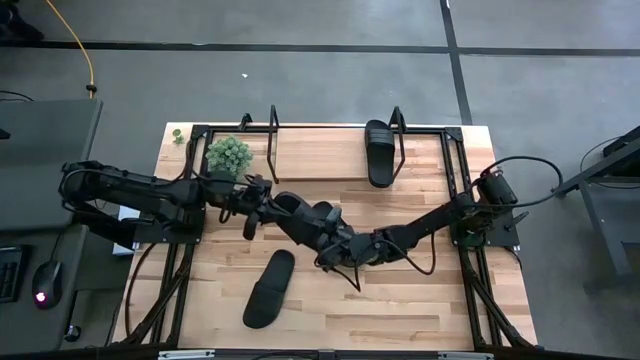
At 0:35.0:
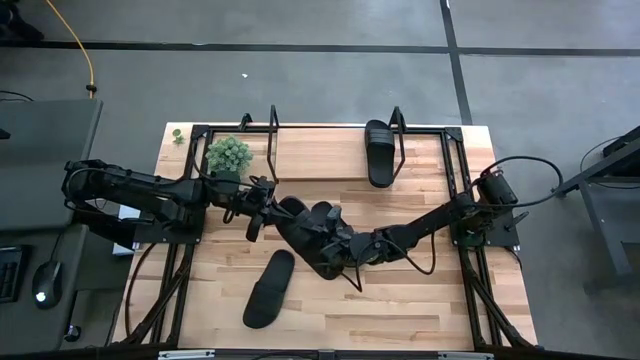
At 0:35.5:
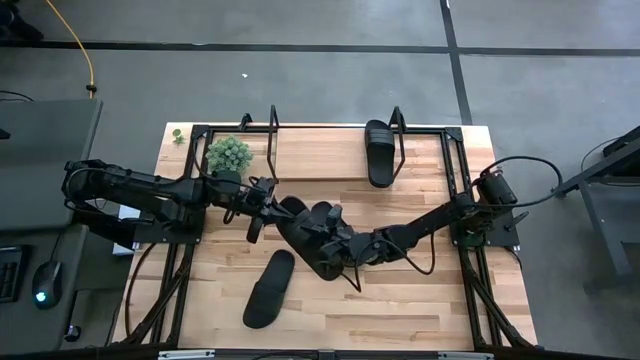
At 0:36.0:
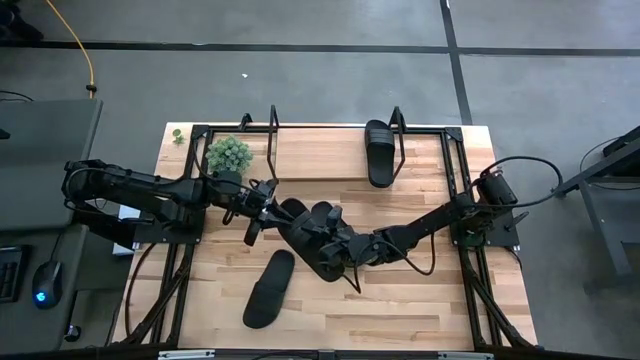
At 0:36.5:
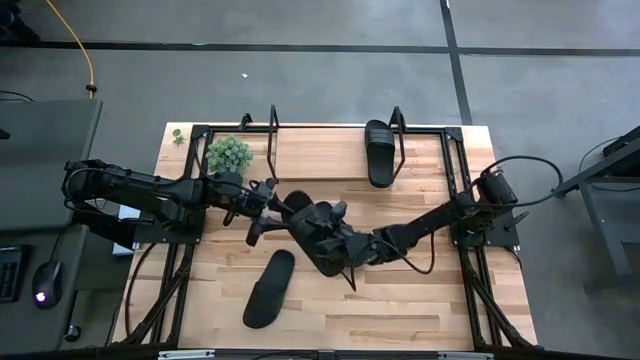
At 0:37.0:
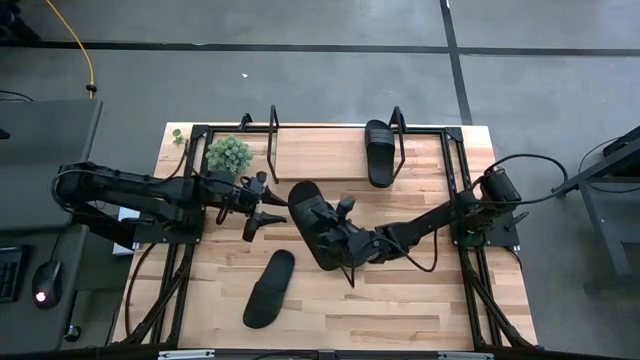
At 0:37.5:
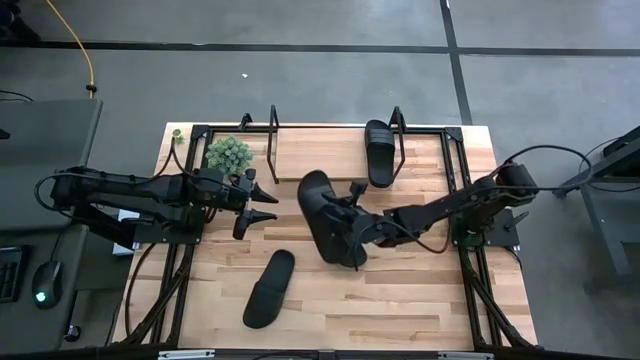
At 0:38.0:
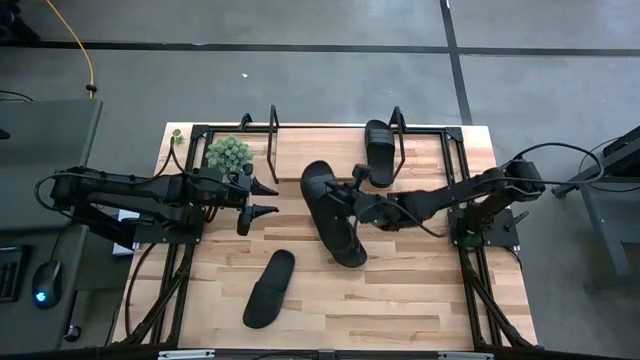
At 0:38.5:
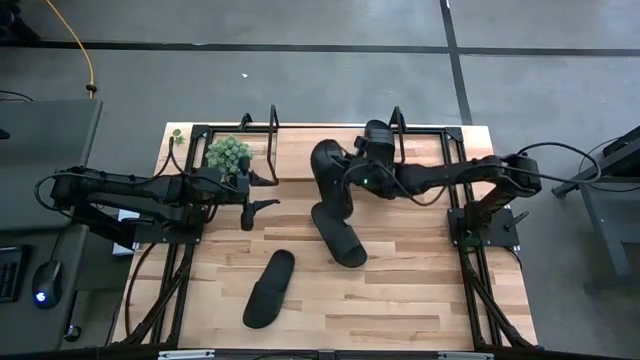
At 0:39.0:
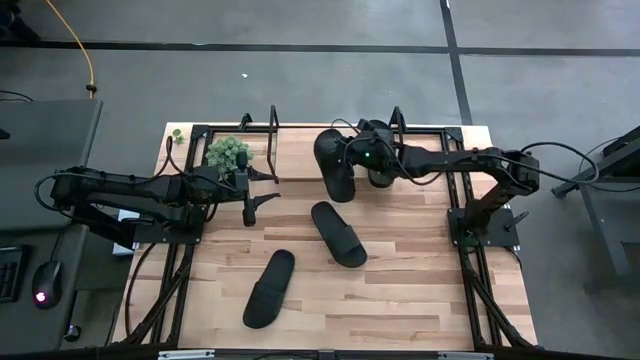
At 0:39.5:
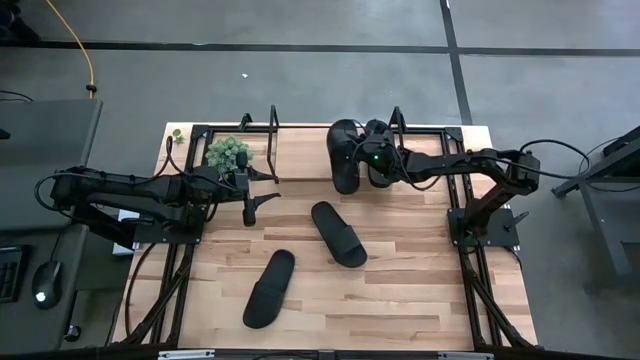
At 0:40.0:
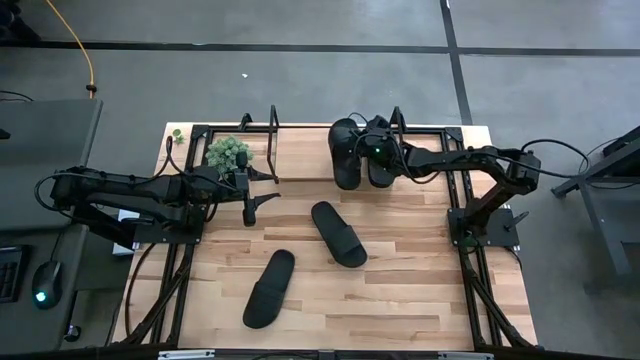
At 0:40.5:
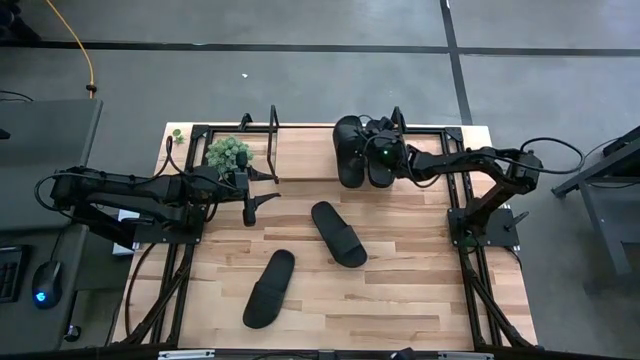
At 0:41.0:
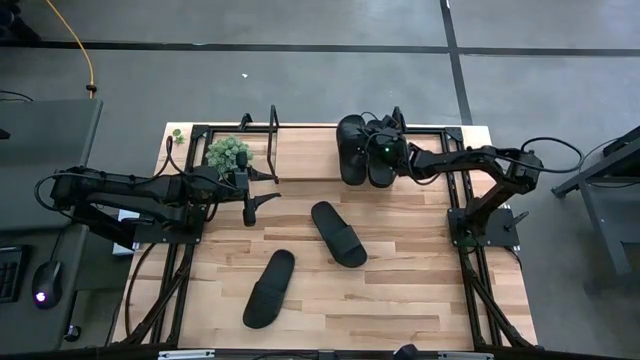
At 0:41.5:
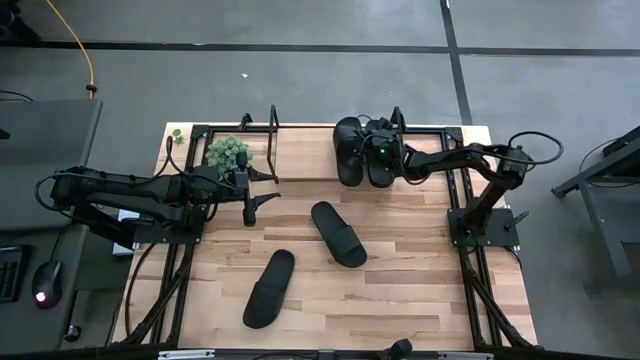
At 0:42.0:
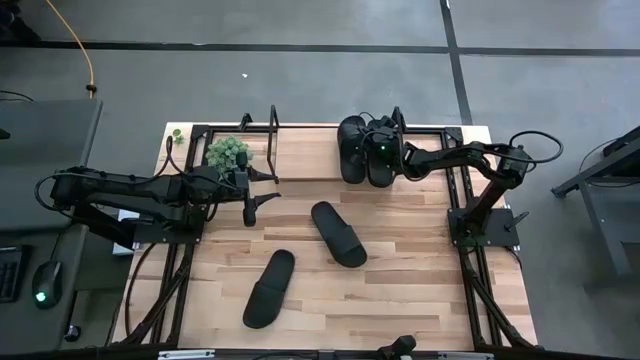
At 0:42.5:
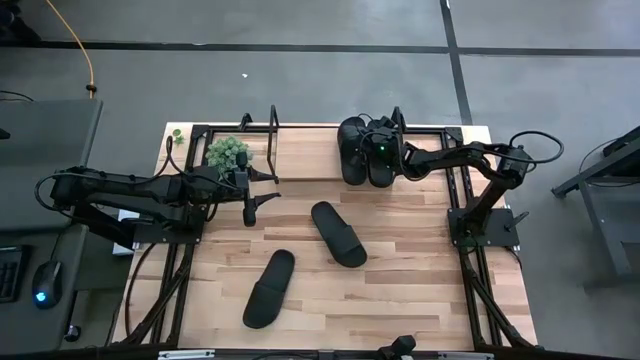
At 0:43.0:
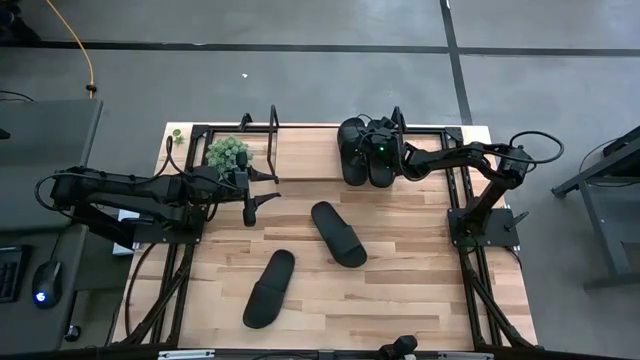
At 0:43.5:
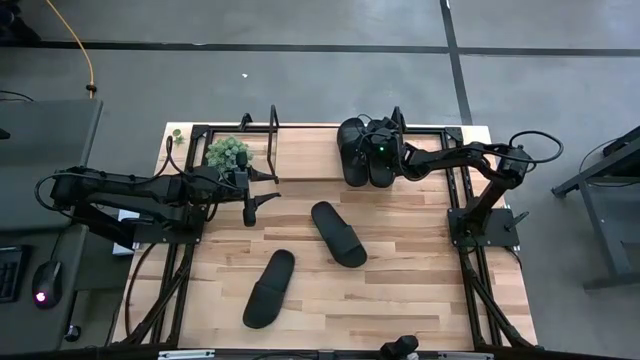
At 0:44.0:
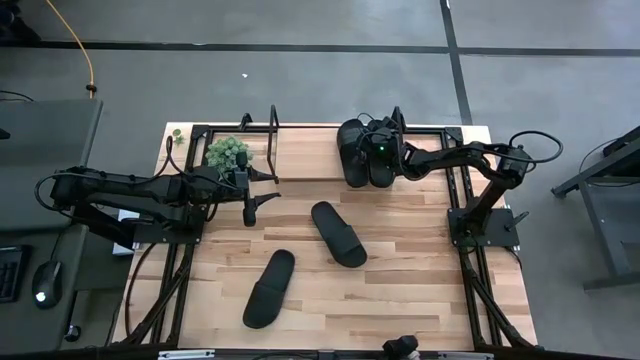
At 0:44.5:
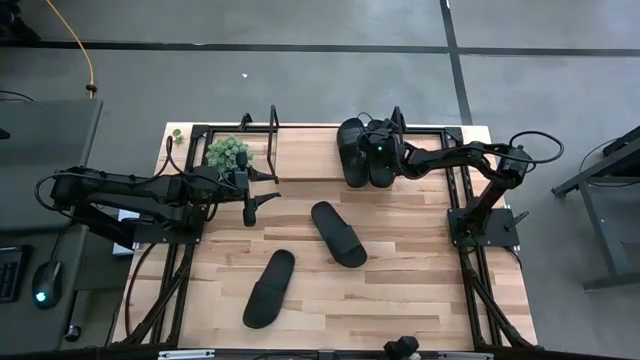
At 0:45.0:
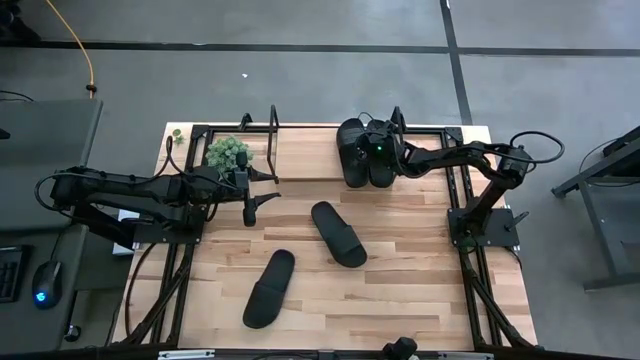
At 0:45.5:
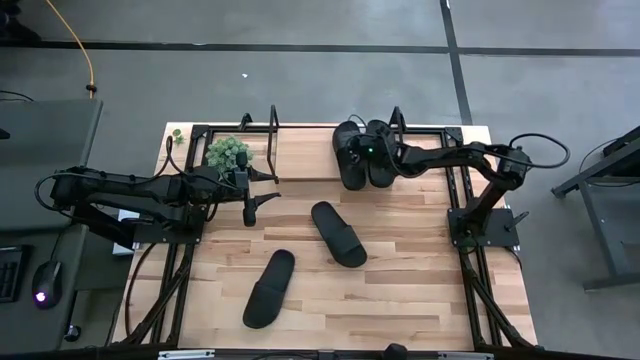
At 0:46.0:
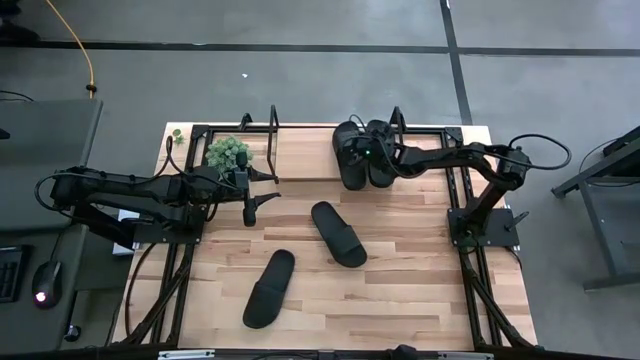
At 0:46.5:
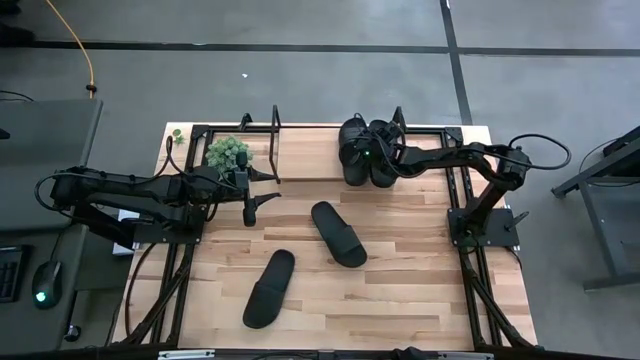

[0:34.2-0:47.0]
Task: Pick and place slides into the shelf
Put the black slide on the shelf

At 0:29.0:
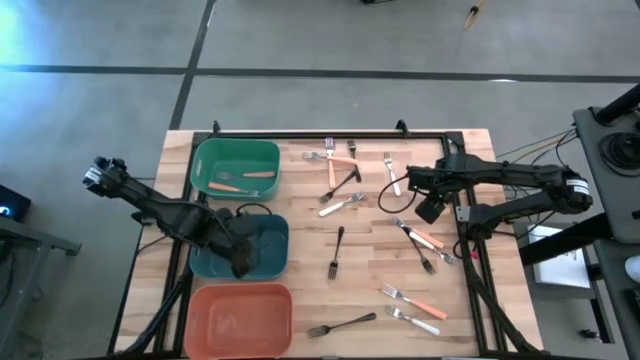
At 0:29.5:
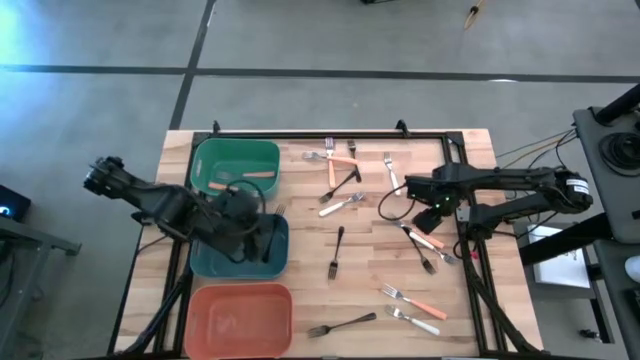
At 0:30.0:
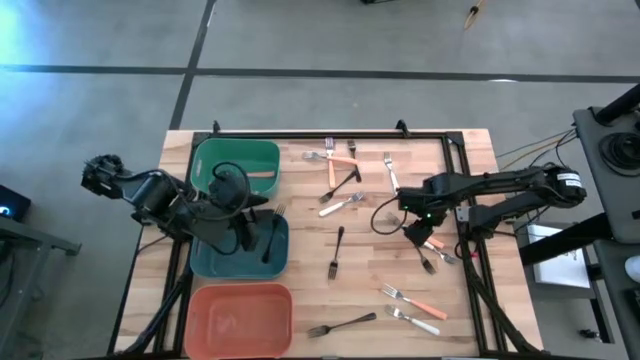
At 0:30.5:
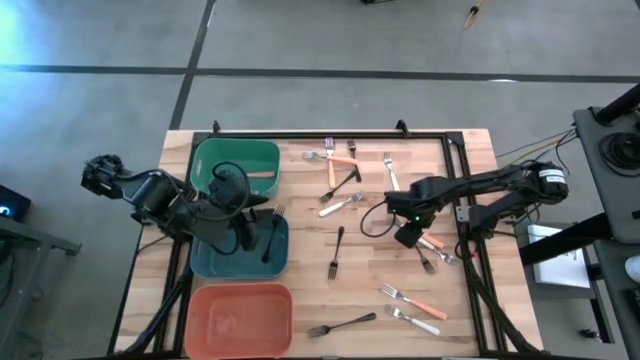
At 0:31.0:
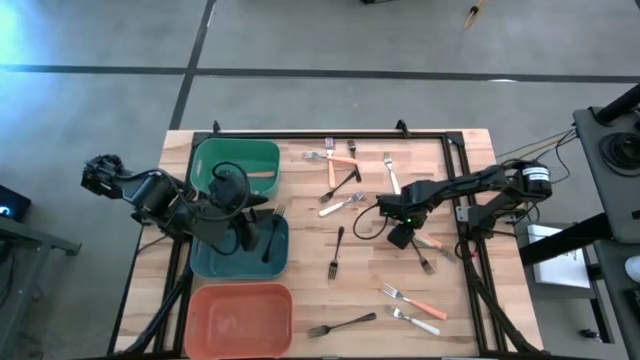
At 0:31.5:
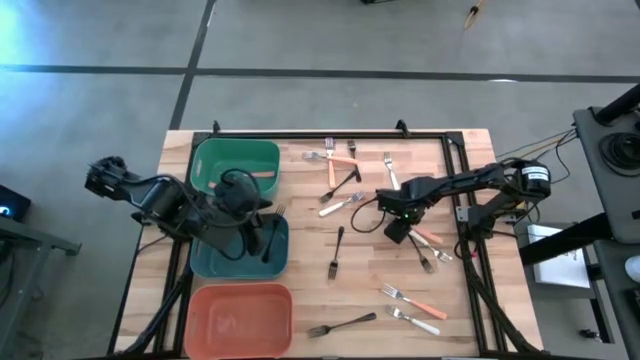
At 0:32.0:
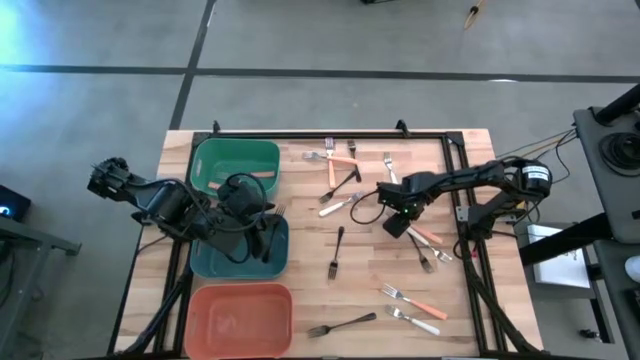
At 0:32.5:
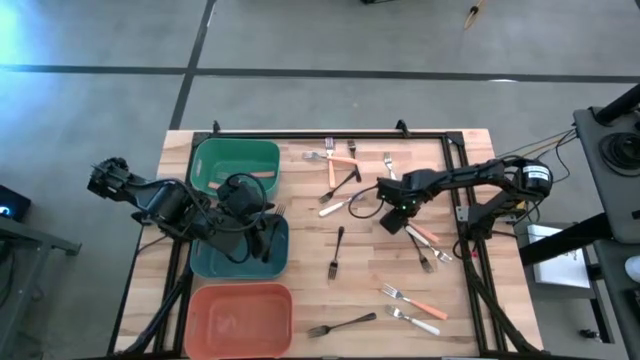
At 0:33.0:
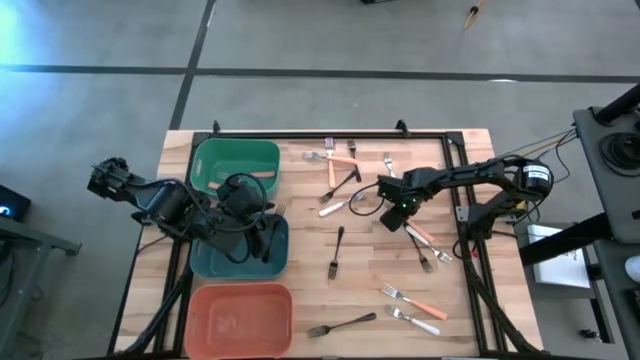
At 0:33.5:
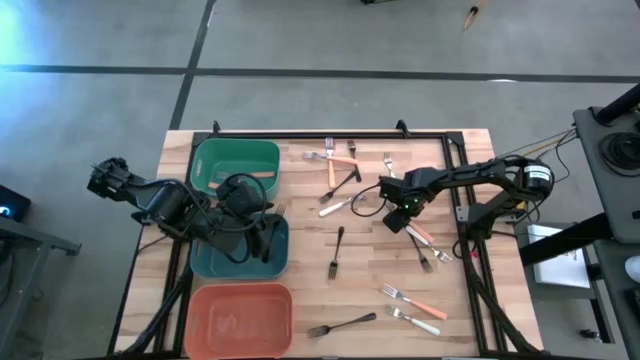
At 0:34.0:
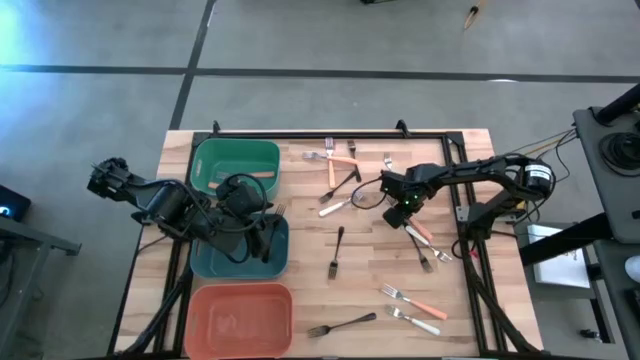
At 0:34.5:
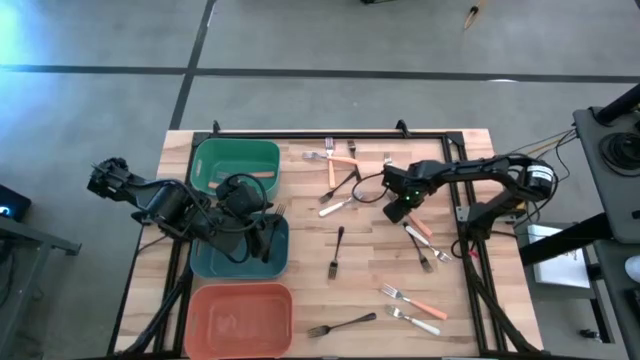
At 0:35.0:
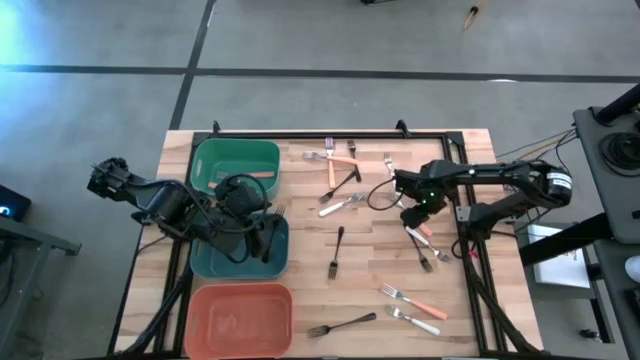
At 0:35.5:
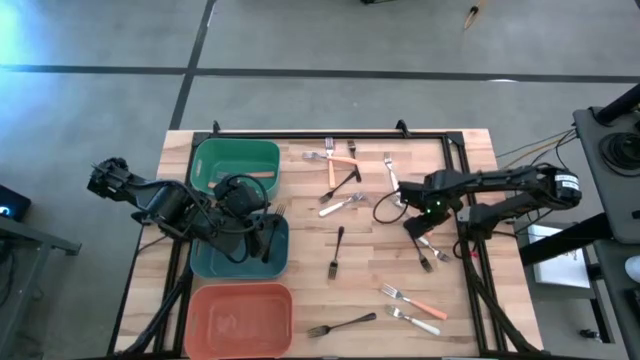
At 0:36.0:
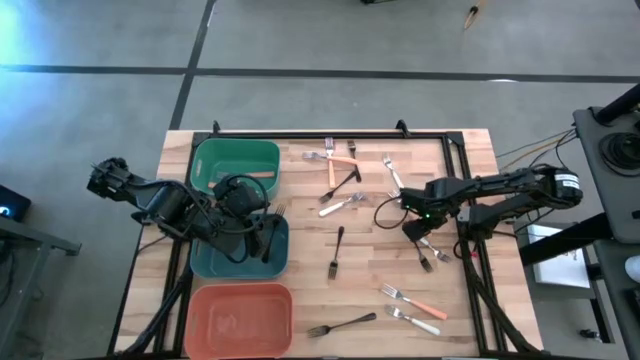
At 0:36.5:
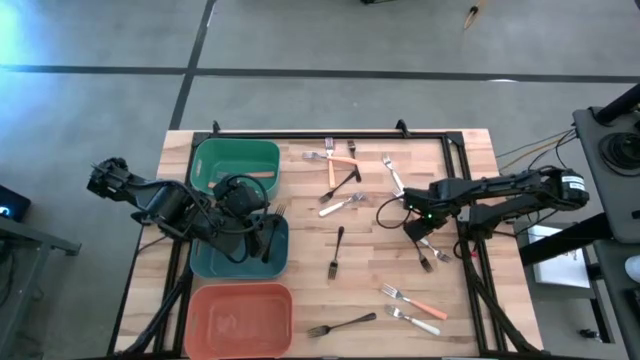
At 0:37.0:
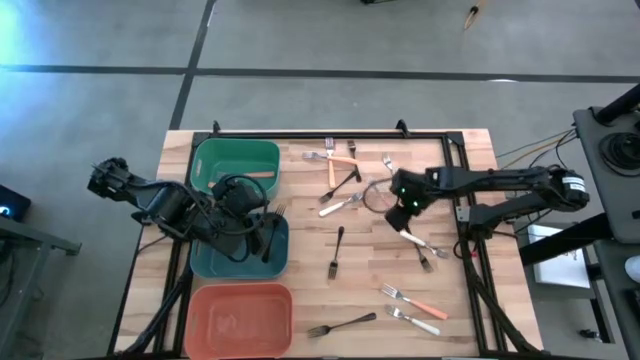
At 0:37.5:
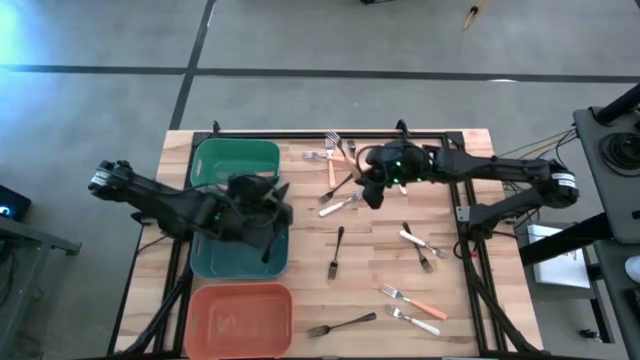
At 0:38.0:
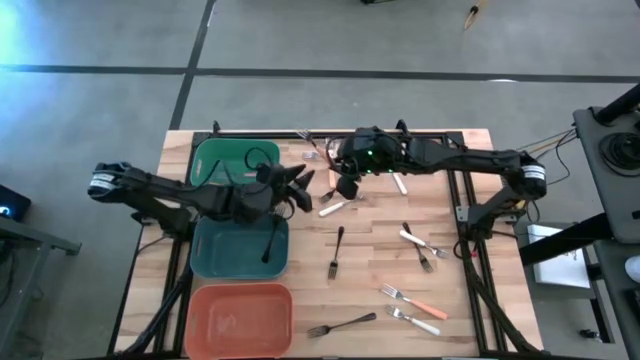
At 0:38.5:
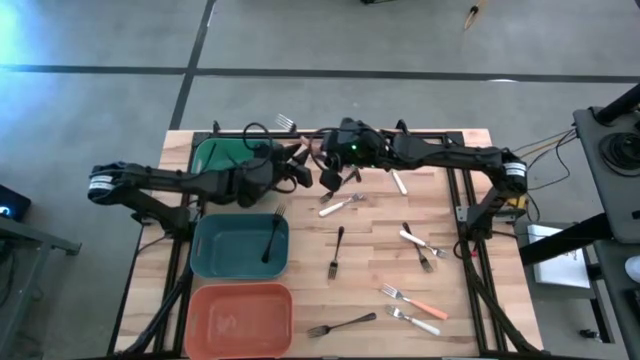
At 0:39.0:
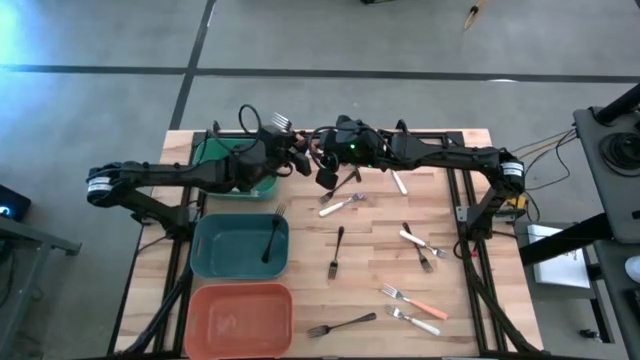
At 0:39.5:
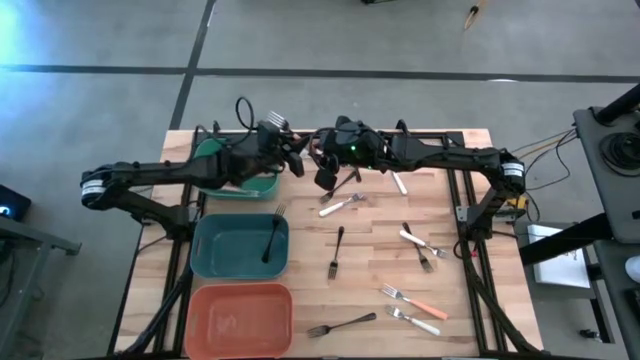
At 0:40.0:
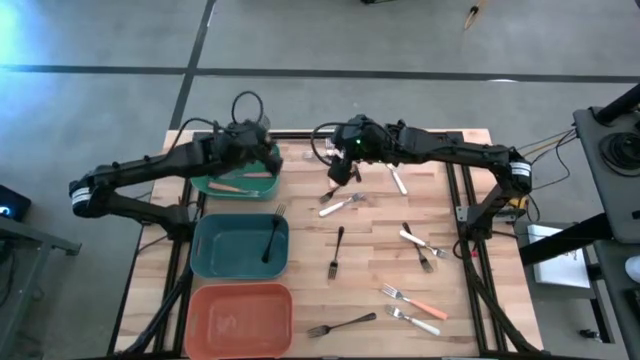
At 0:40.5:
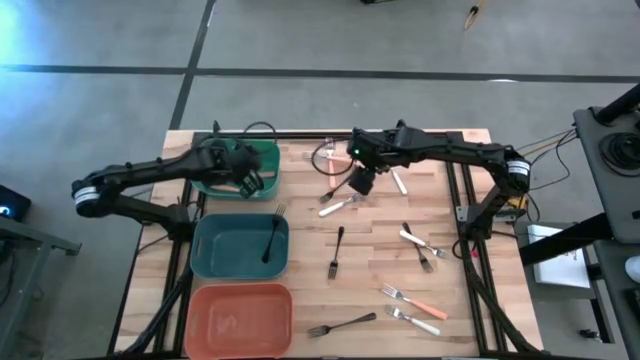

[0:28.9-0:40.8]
Task: Sort silverware by color (type)
Put the orange fork into the green bin
